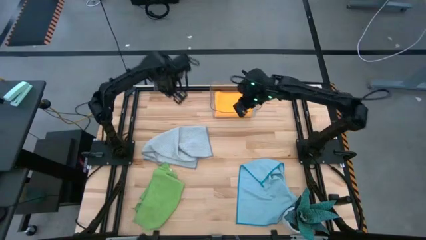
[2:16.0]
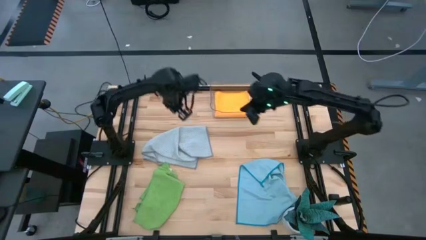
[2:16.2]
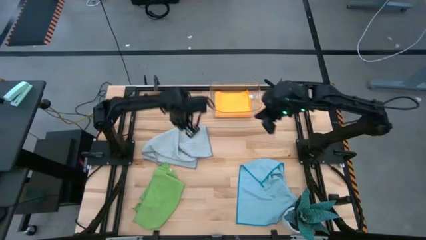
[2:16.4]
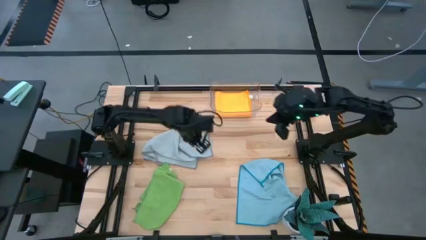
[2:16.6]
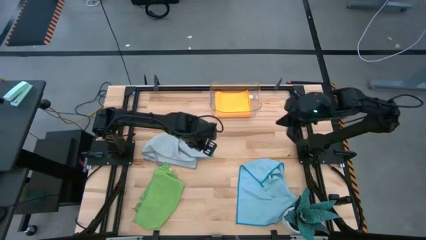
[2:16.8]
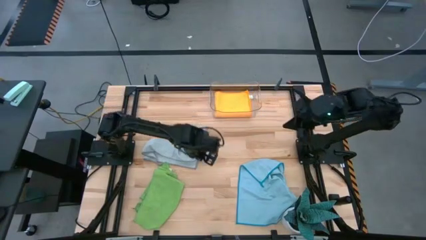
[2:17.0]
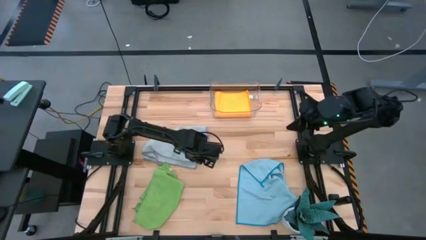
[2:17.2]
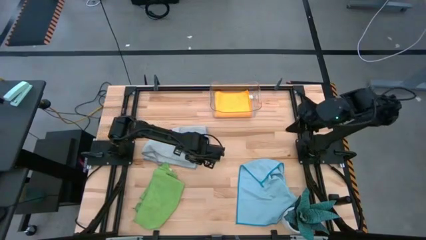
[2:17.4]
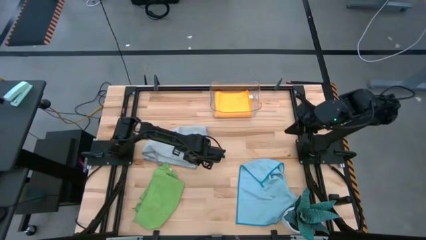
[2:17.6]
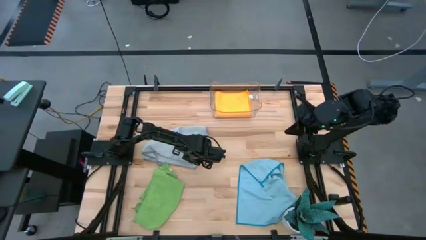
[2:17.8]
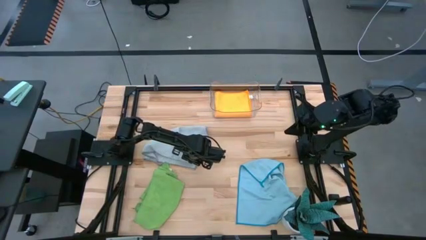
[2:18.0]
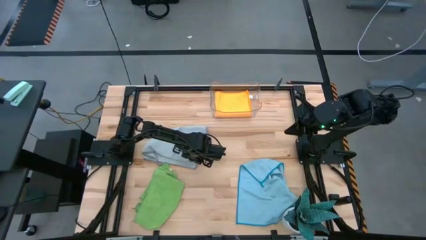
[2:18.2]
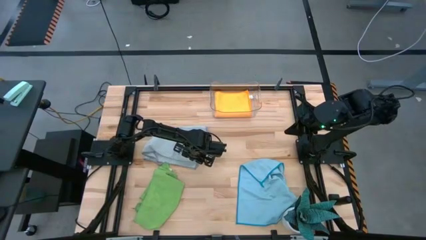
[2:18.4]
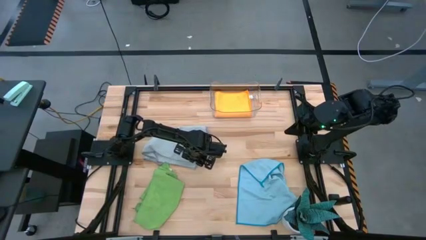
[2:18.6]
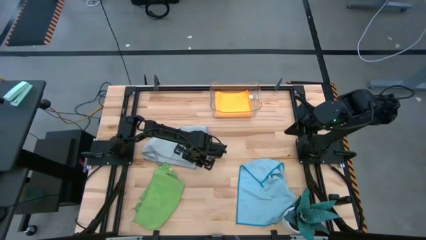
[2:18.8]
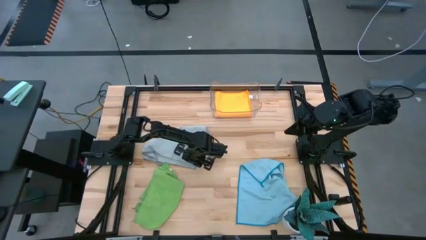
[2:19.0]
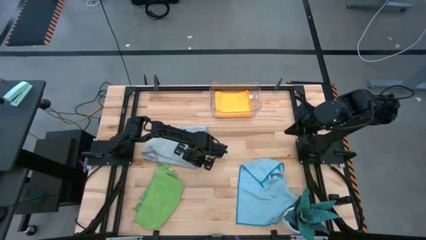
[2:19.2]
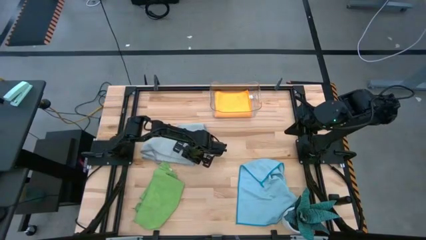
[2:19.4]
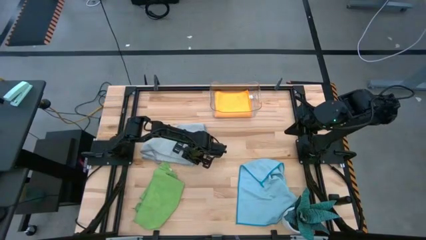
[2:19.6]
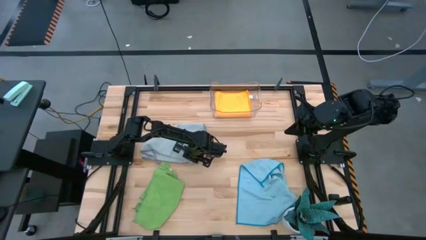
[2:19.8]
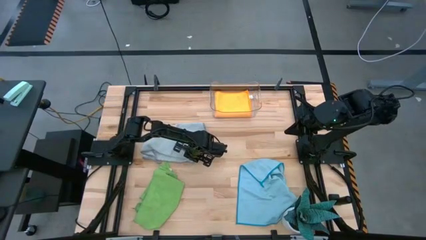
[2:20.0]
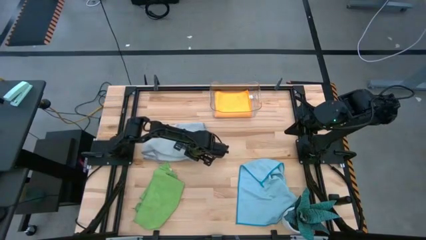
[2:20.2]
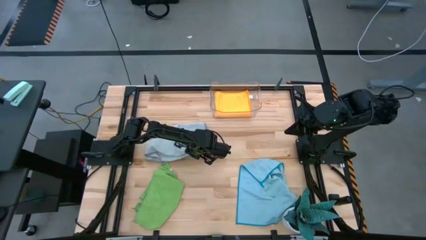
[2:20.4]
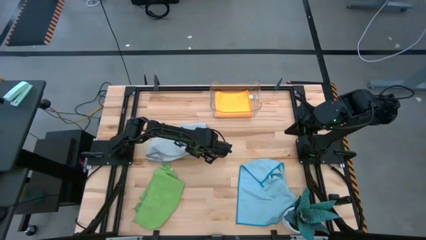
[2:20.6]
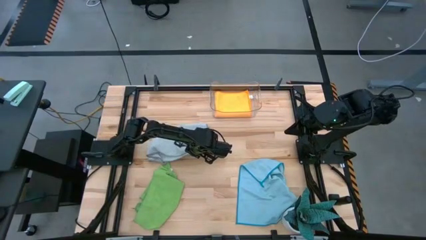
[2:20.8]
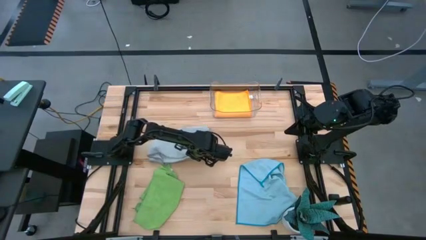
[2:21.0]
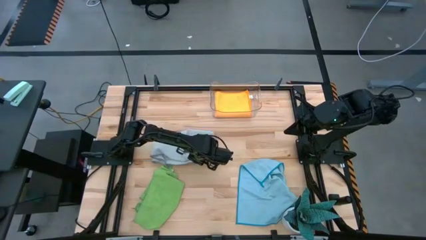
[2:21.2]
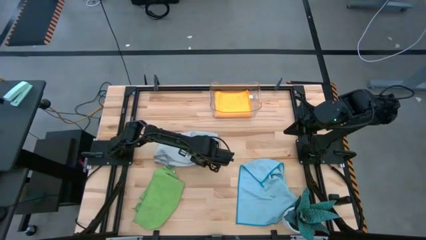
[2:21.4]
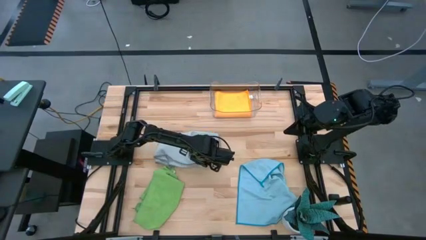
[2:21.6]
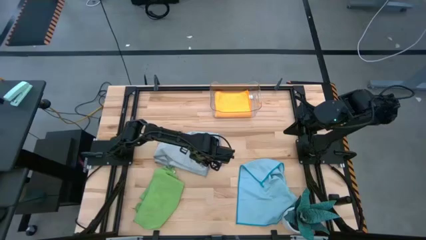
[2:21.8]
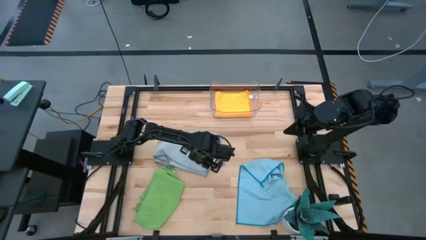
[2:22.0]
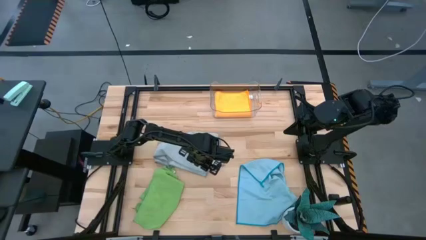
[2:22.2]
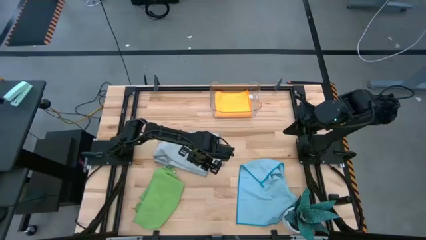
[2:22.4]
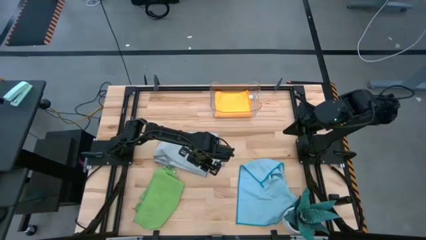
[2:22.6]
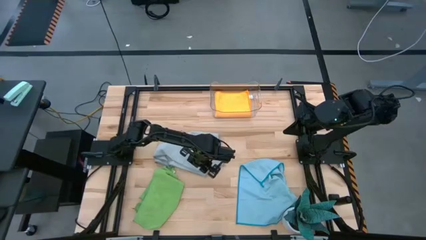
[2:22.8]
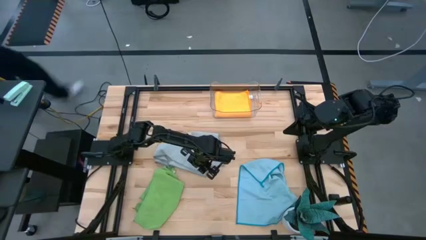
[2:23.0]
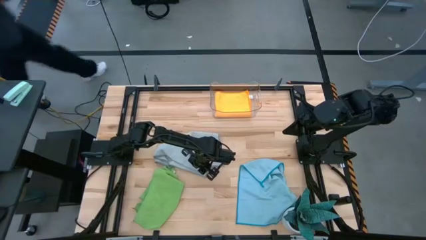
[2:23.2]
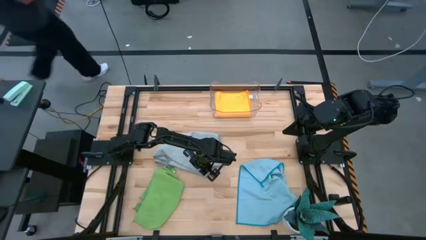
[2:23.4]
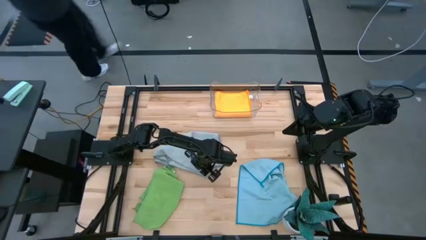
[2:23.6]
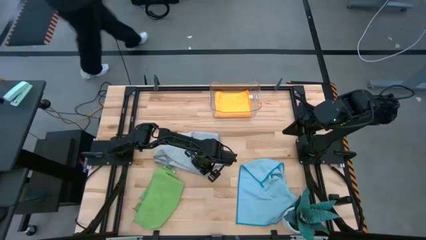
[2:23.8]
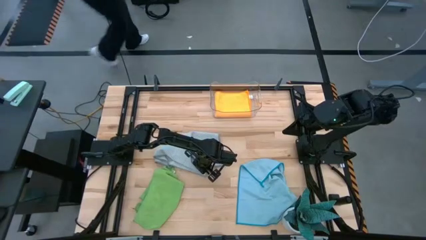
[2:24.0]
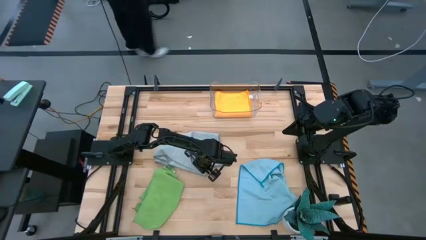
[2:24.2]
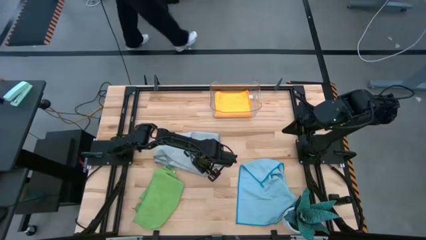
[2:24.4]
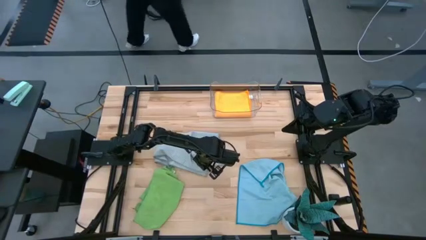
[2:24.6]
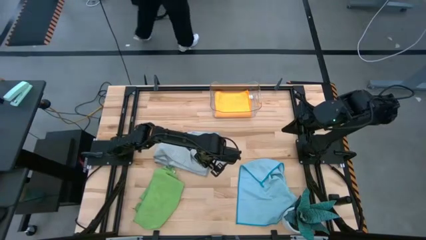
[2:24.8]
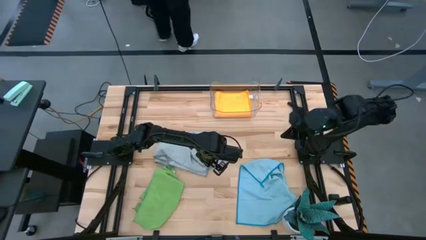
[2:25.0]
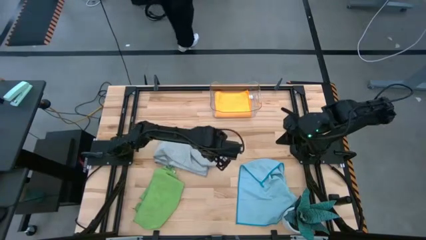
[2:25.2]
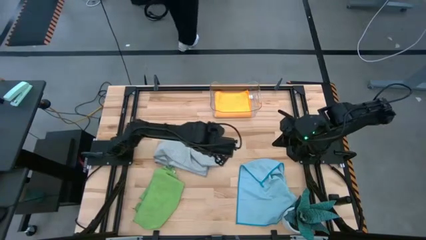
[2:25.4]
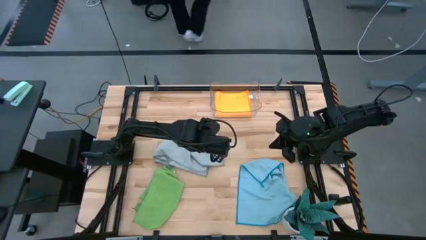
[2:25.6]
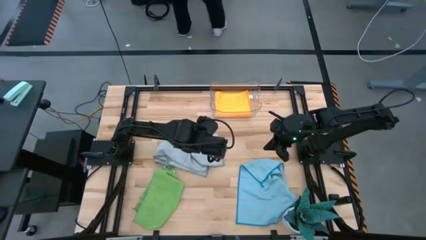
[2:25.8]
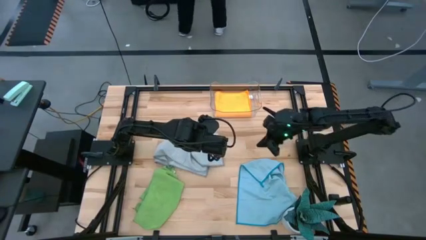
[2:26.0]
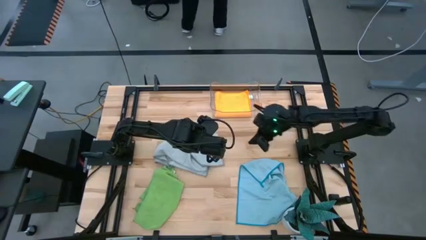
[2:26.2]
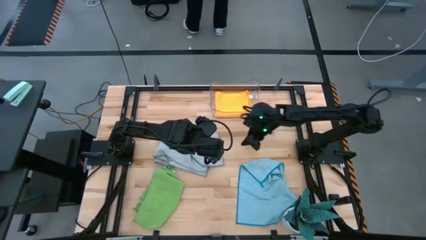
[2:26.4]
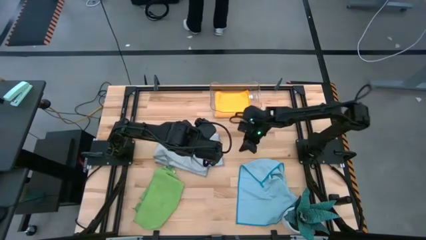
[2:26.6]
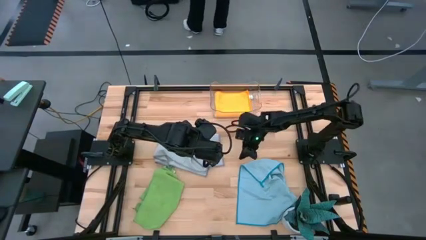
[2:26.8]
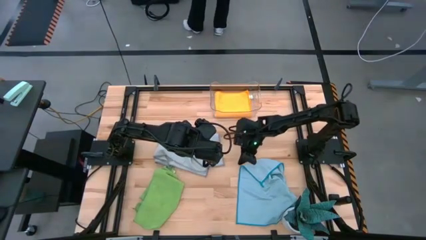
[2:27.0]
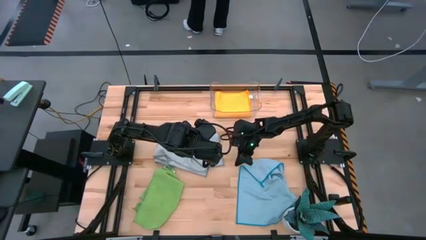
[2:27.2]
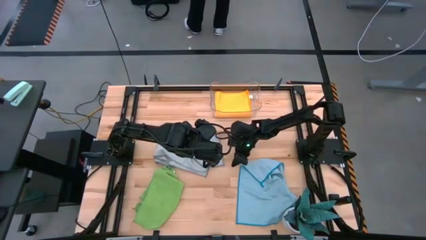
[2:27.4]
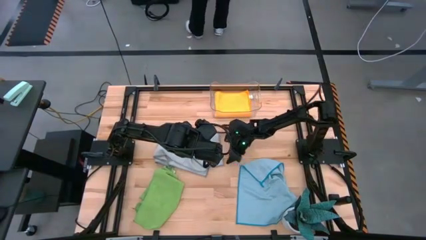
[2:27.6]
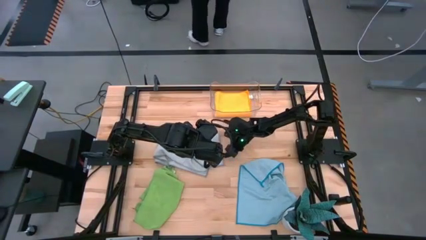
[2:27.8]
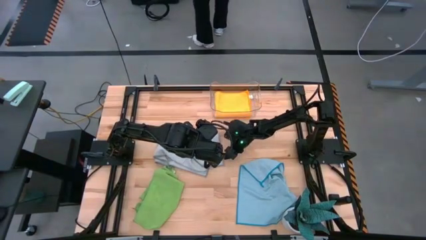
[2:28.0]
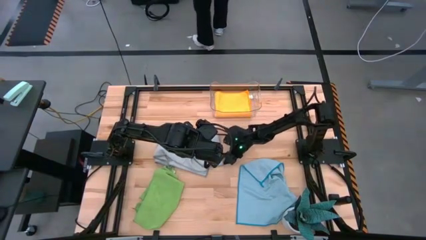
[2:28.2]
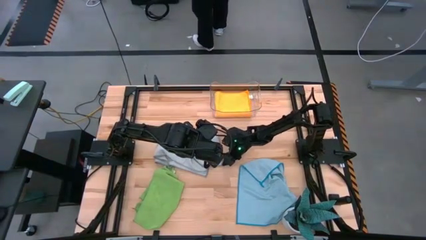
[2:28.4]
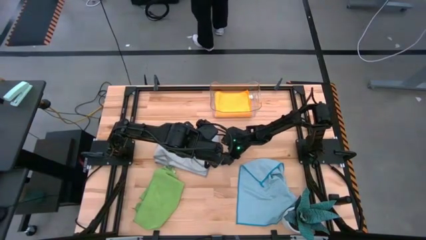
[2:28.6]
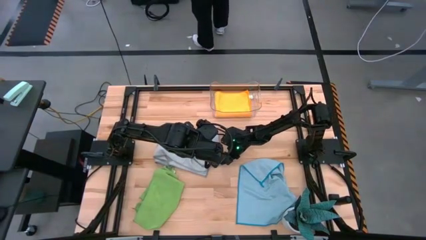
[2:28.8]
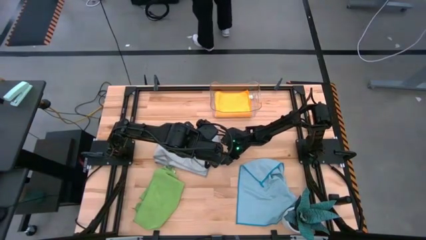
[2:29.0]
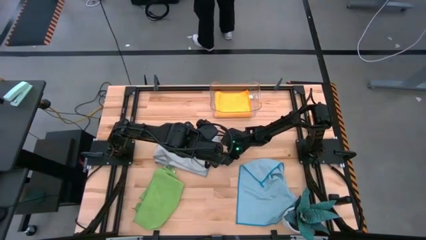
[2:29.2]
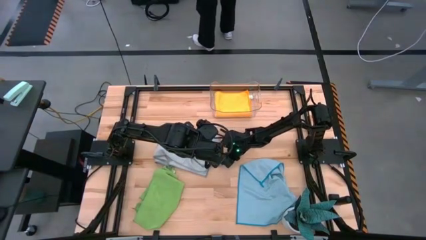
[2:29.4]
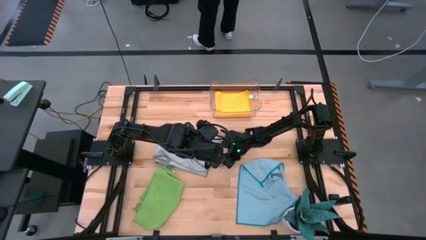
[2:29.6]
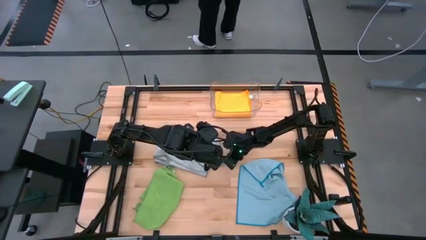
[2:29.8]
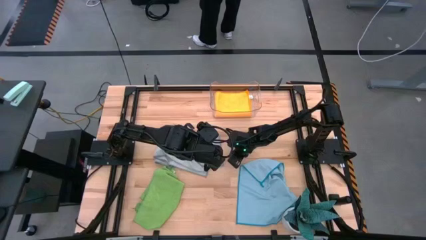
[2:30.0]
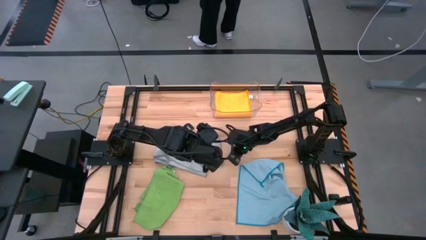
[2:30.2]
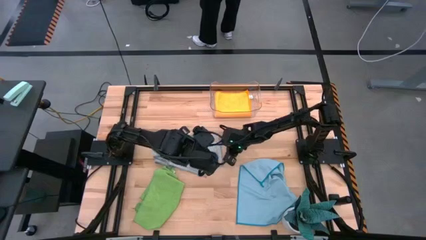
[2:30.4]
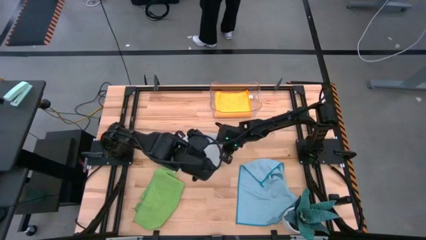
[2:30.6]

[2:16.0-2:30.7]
Task: Fold microfiber towels
Fold the gray microfiber cloth
